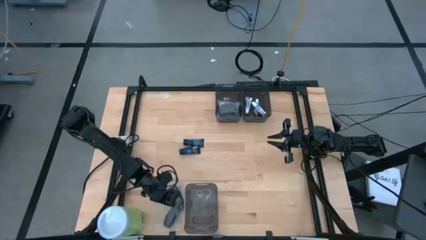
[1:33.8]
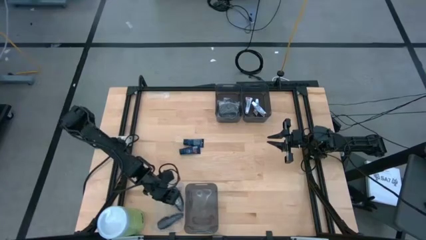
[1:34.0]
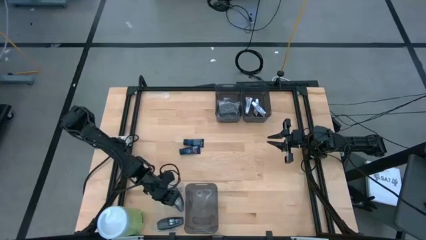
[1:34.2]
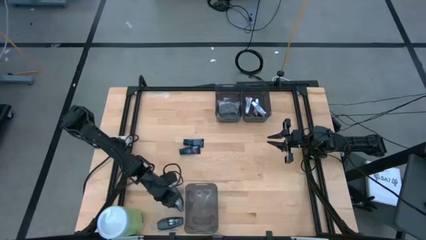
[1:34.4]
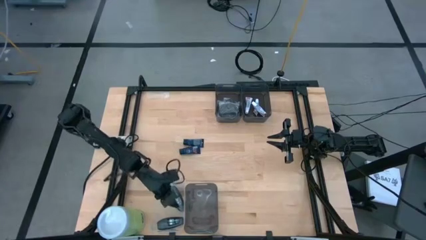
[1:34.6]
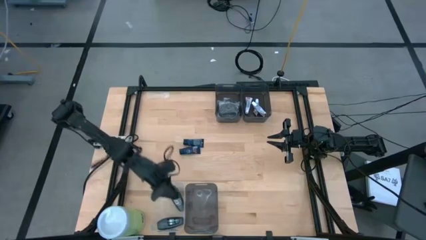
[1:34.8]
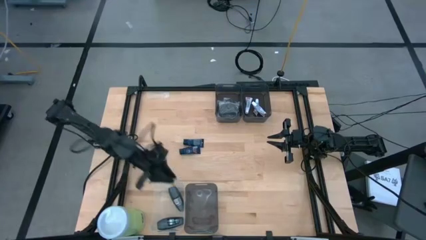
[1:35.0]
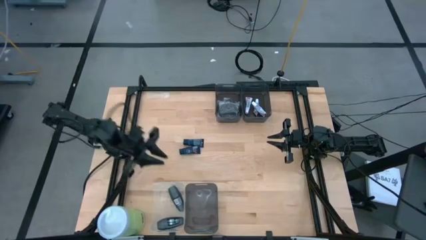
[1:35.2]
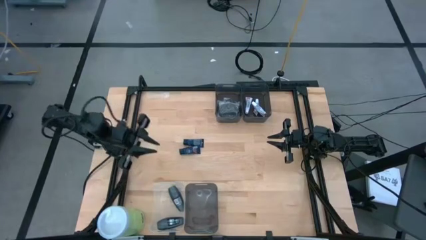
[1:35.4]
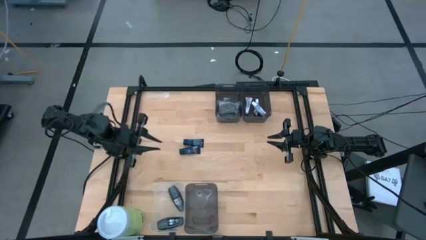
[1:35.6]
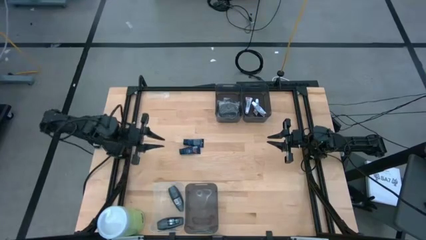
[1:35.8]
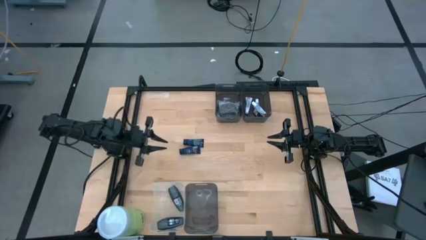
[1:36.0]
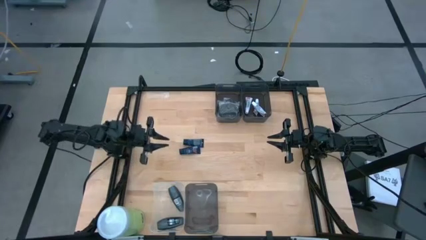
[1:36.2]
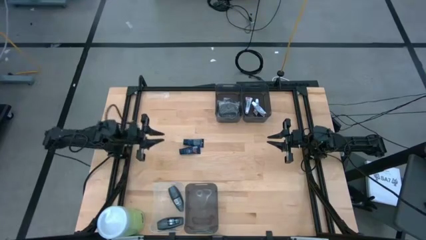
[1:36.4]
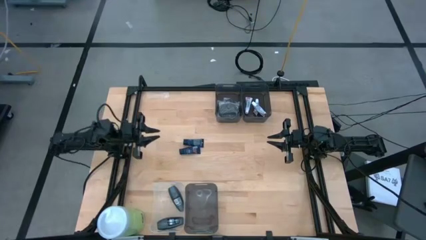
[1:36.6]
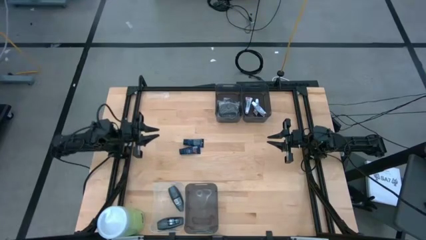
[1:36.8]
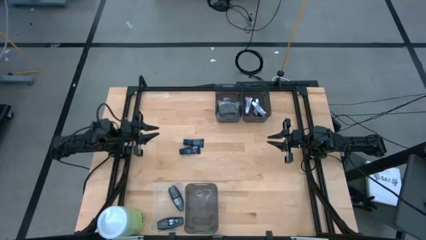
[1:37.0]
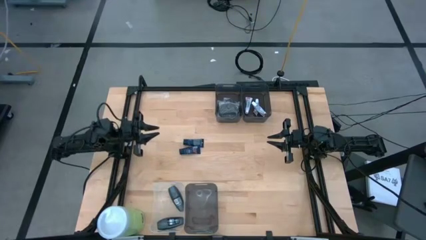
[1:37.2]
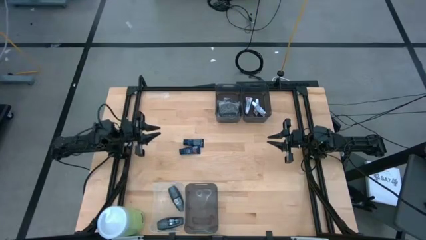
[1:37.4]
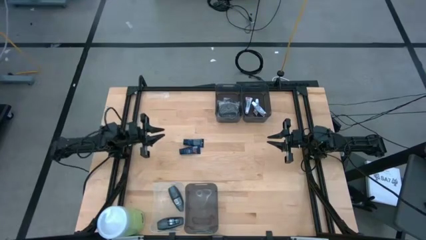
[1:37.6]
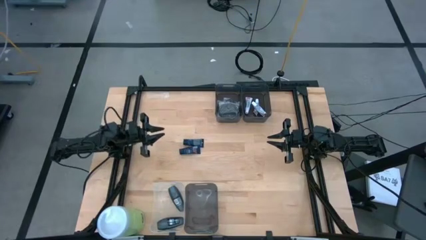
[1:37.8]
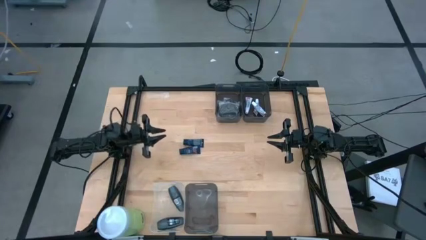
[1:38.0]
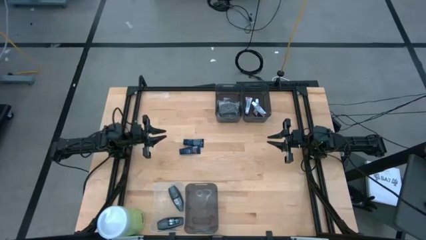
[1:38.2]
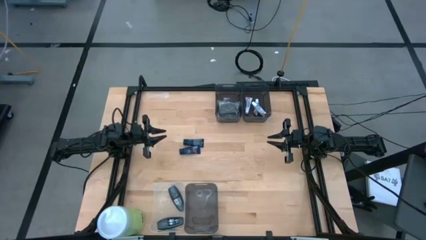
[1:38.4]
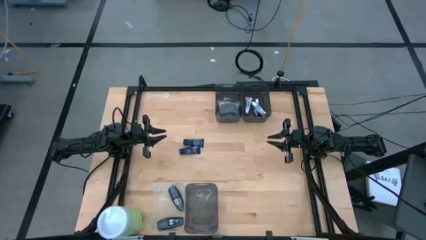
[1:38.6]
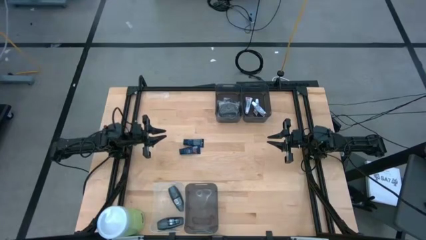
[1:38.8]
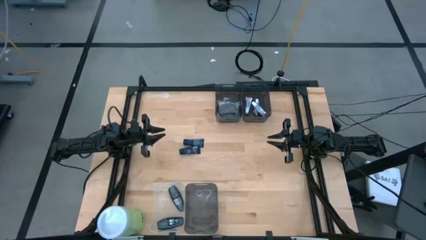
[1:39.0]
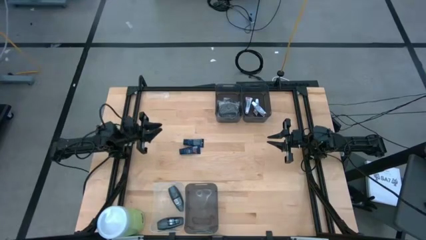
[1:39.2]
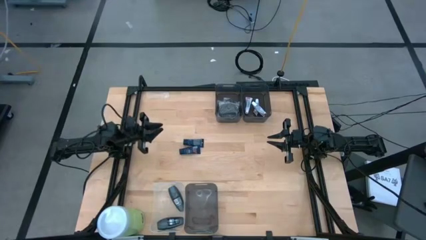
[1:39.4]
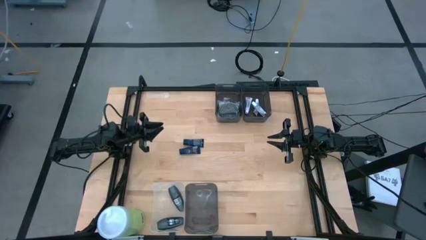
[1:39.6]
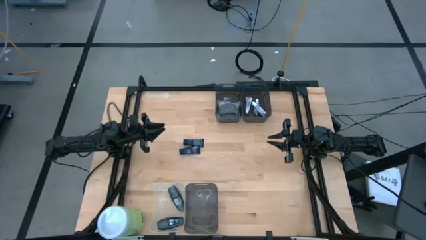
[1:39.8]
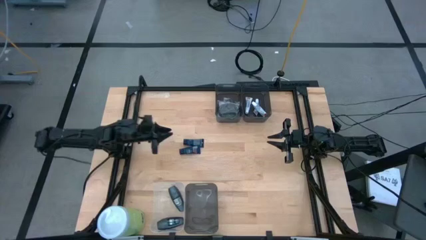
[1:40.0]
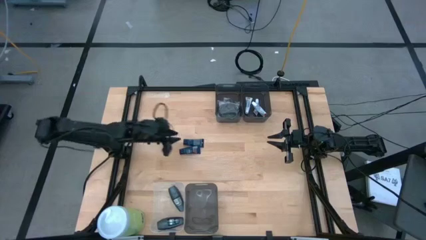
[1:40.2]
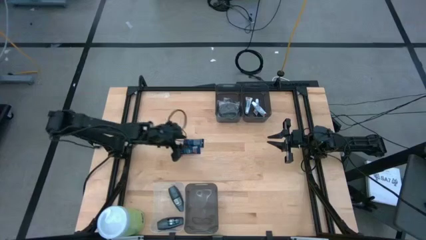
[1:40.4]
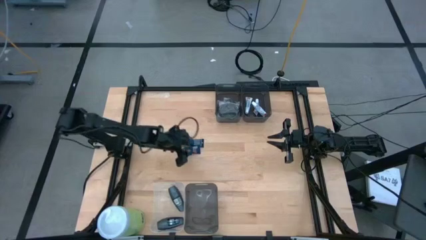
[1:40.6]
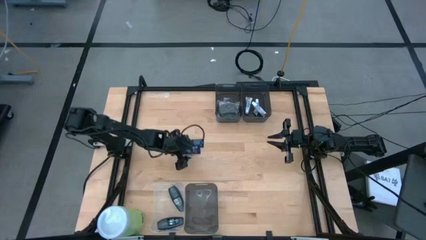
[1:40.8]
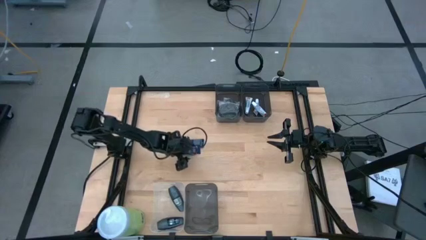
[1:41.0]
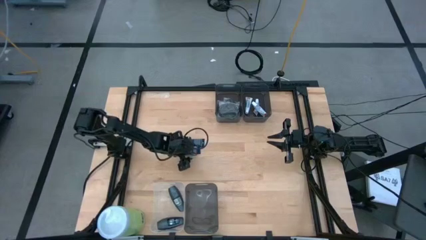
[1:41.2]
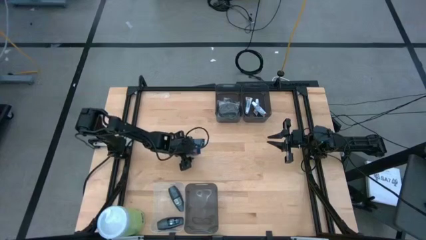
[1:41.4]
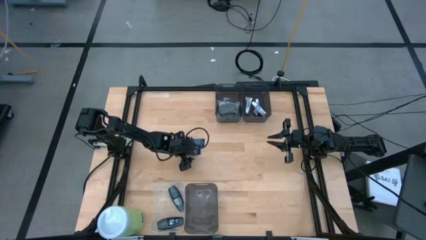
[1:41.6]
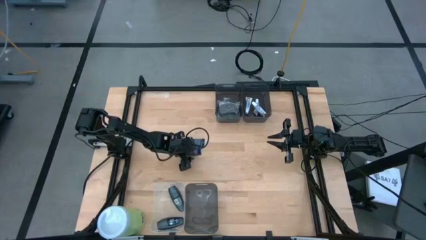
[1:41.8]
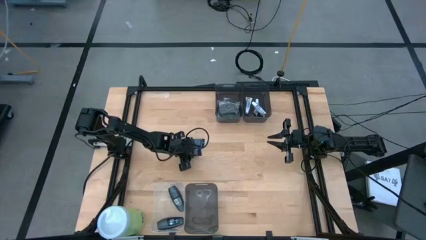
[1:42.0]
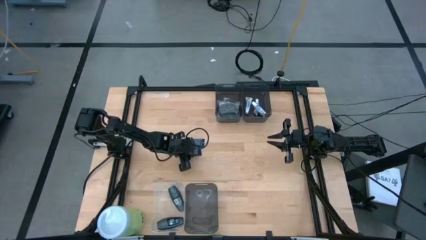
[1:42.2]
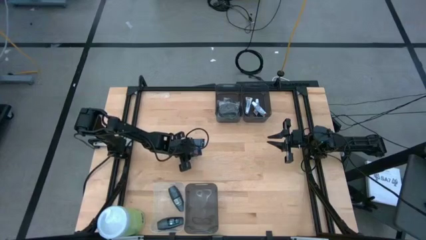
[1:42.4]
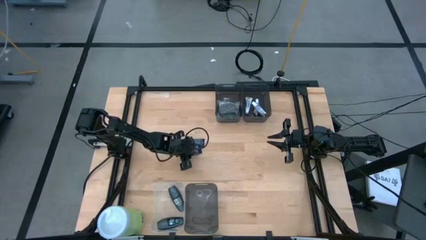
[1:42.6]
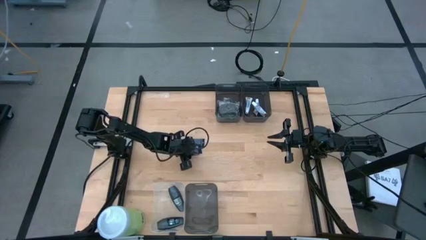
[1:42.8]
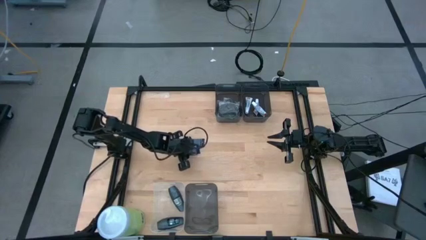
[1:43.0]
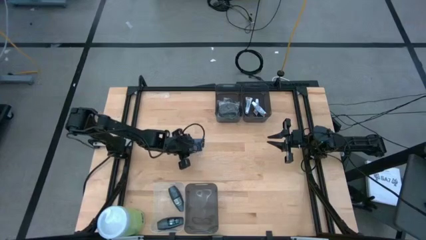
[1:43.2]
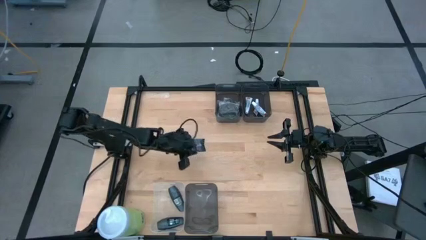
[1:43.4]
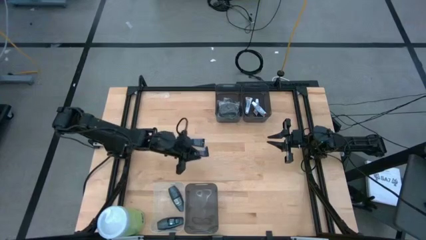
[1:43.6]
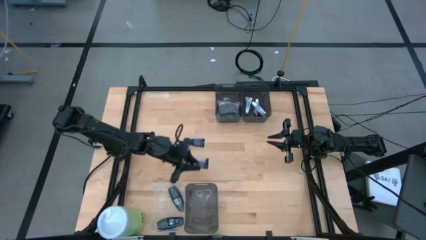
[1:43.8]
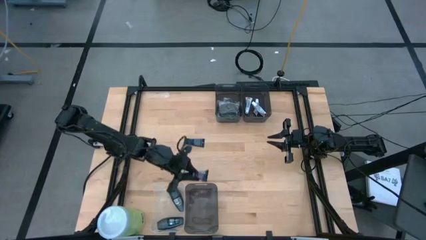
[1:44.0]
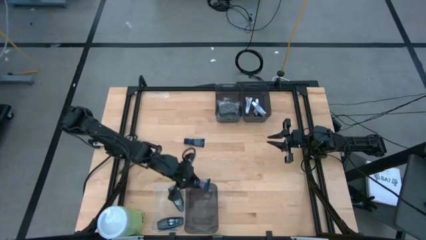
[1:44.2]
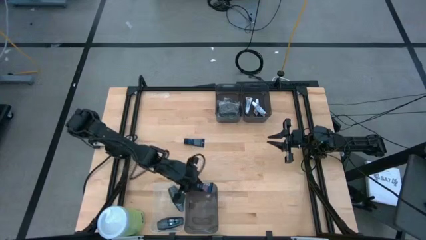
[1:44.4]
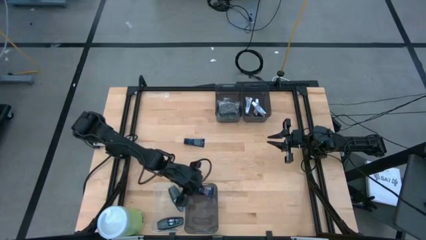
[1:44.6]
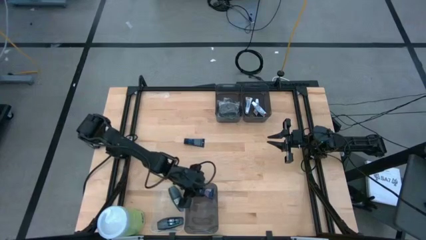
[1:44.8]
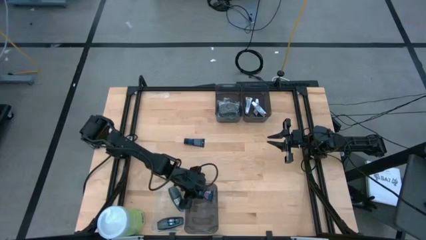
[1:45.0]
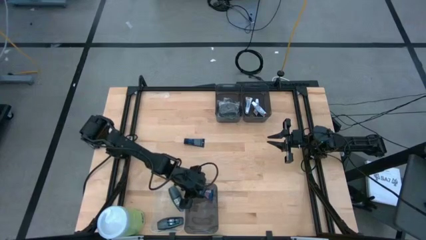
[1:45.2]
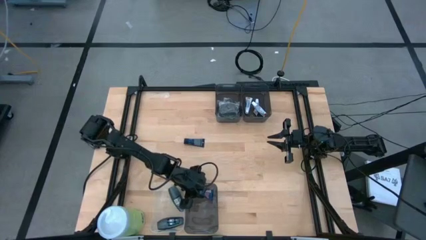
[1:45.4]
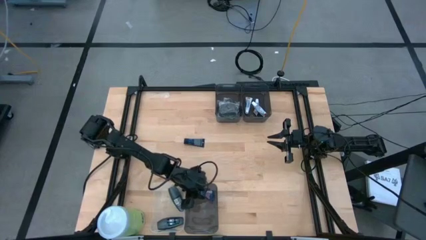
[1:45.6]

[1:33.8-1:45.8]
Task: Pick & Place Travel size toiletries
Put the bottom blue shave cream into the bottom black bin

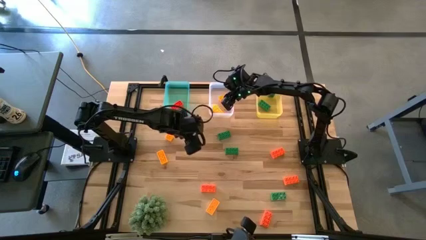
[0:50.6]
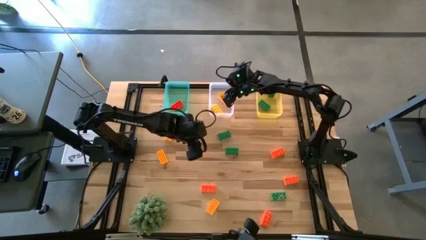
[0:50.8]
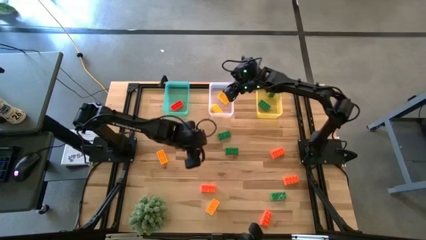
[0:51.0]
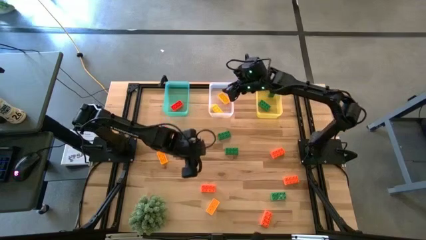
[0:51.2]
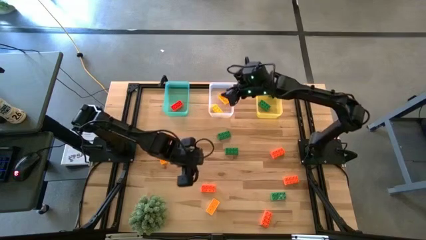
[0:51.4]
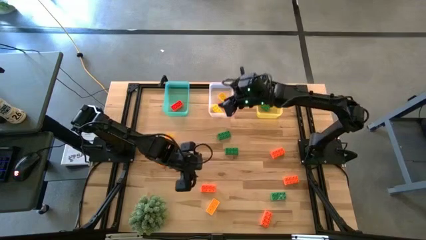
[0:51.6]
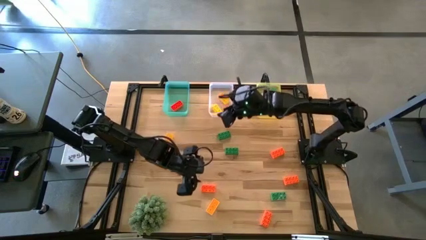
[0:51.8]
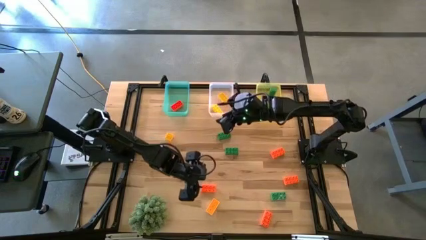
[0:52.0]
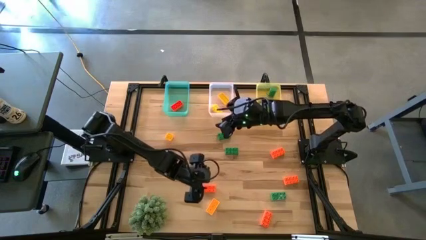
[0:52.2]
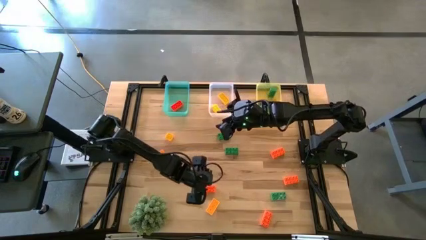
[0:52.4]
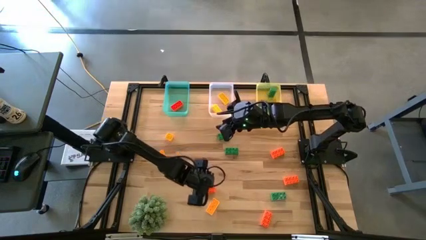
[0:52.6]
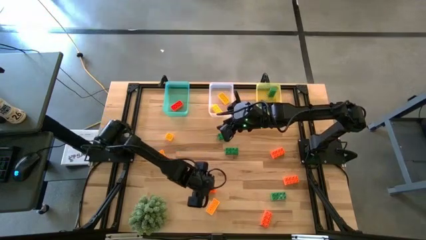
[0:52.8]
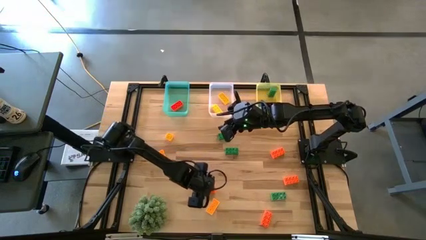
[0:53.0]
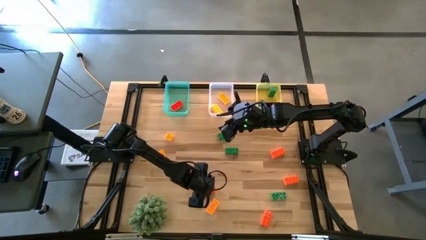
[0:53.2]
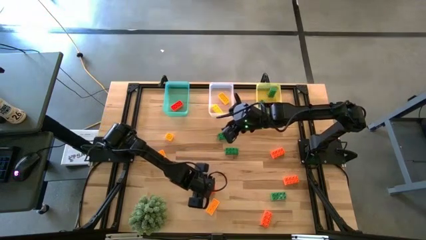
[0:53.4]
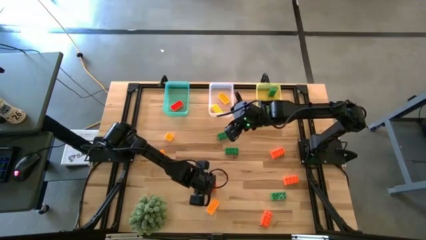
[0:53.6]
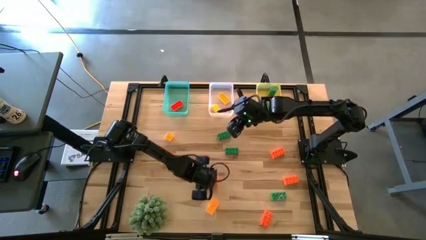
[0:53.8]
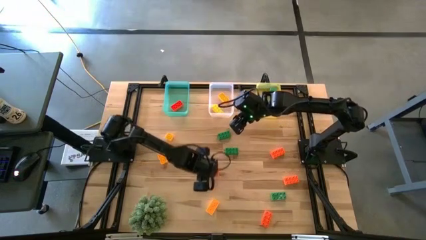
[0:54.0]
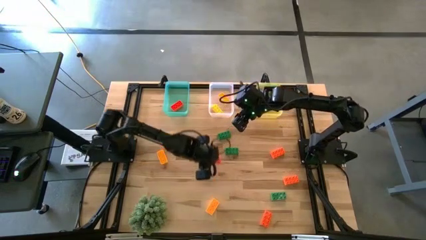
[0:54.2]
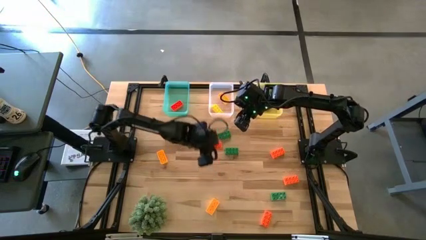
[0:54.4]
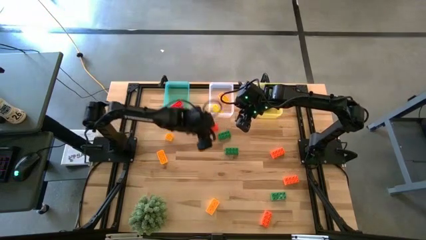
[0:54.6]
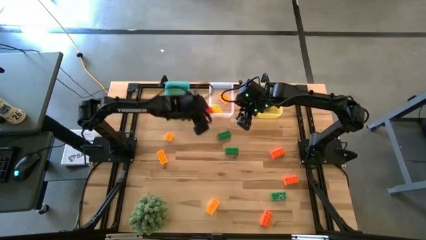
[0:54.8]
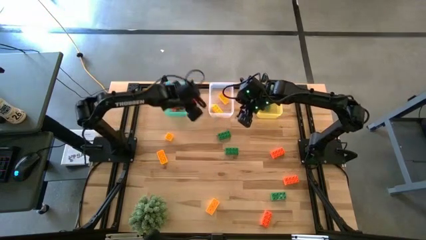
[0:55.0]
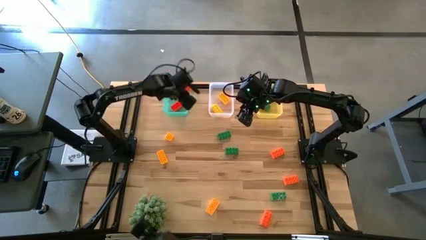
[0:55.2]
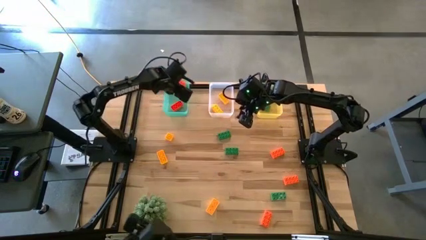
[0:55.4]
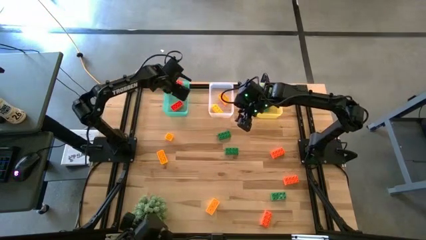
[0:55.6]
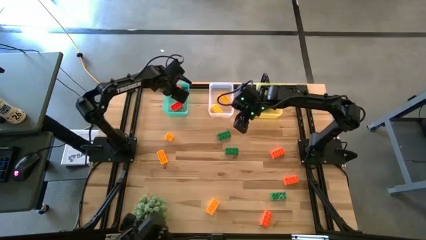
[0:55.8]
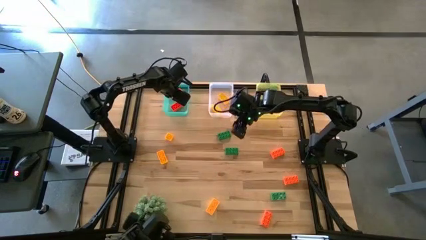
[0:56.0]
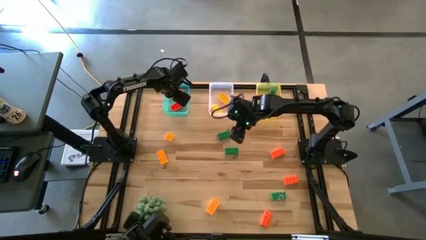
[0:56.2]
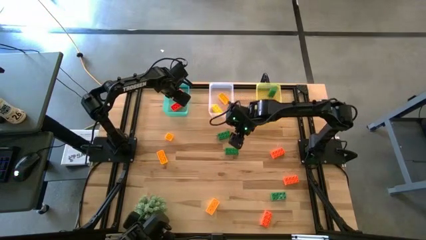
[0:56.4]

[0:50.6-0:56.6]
Task: Sort & place blocks by color
Put the orange game piece into the blue bin
